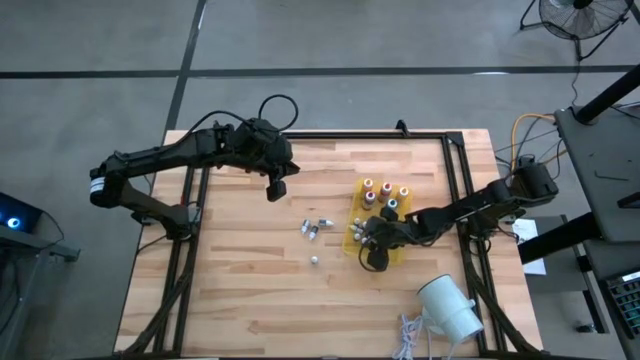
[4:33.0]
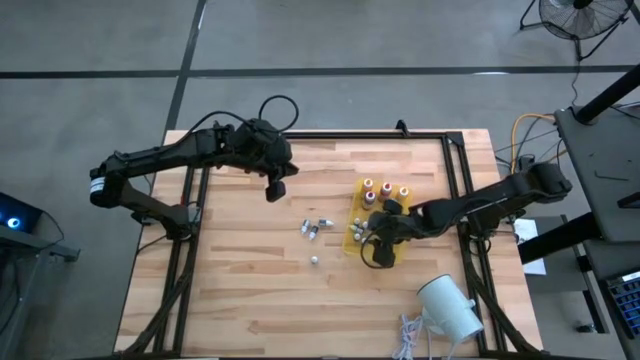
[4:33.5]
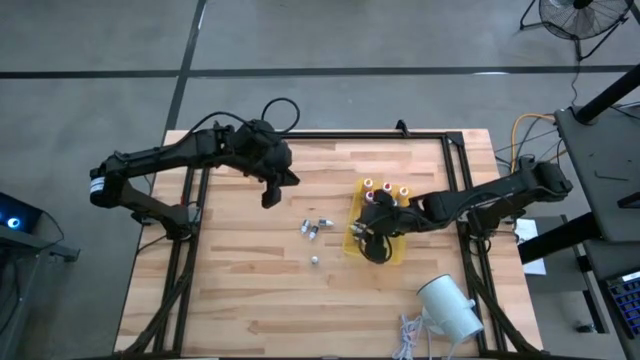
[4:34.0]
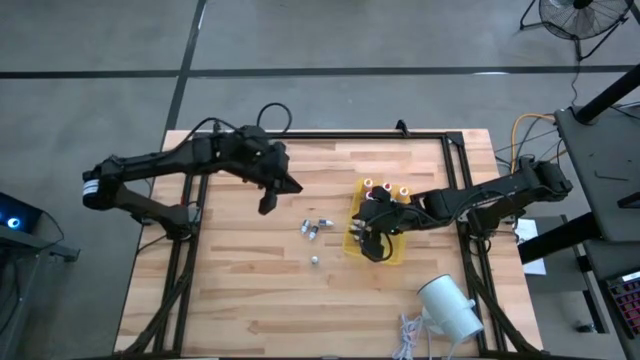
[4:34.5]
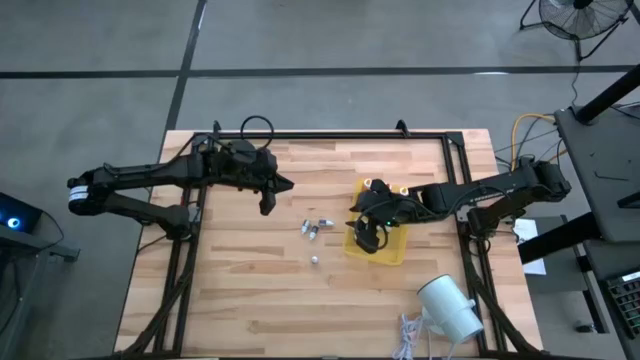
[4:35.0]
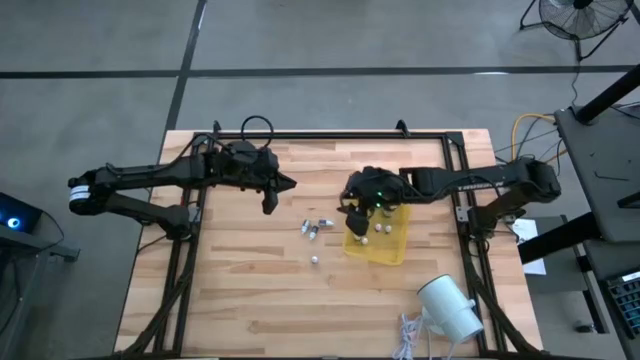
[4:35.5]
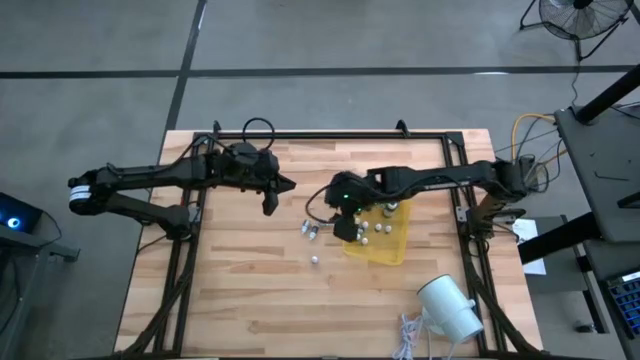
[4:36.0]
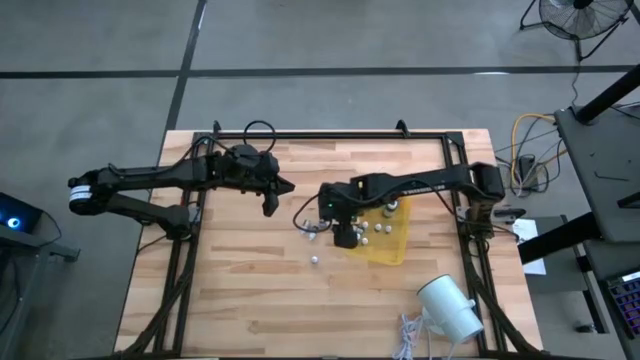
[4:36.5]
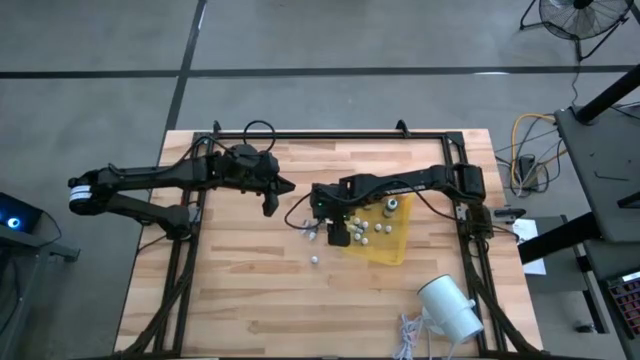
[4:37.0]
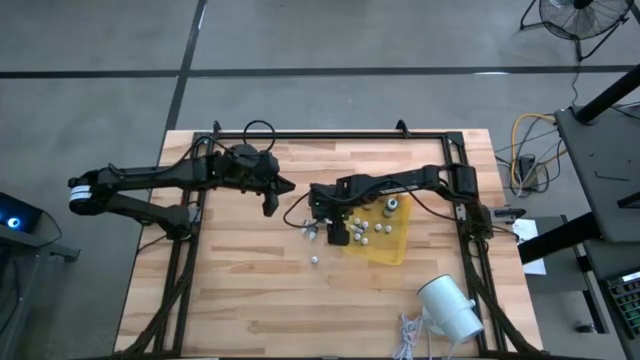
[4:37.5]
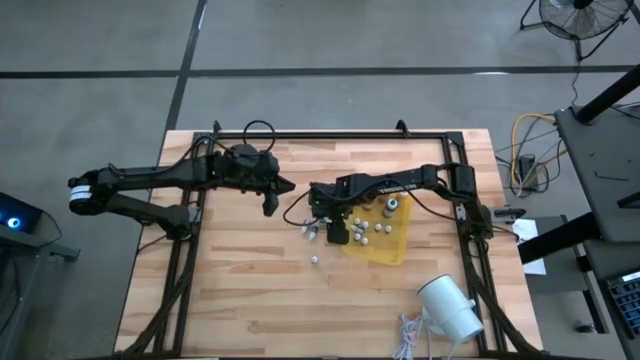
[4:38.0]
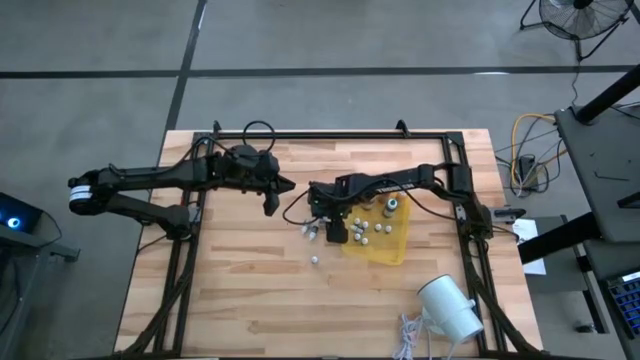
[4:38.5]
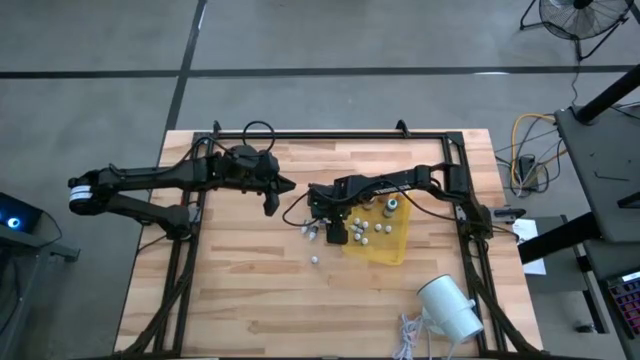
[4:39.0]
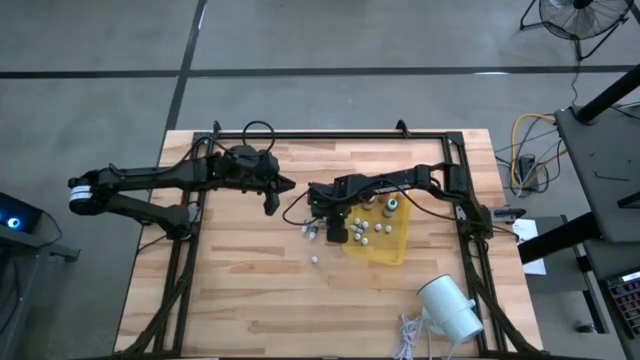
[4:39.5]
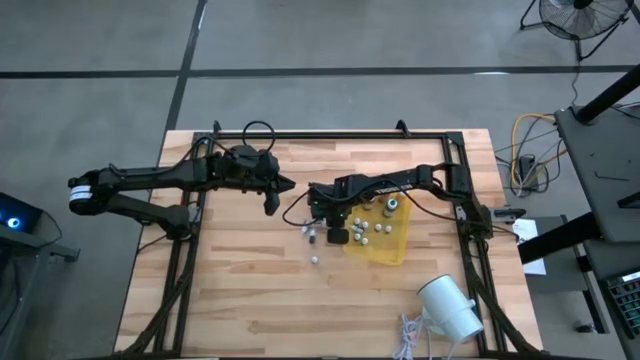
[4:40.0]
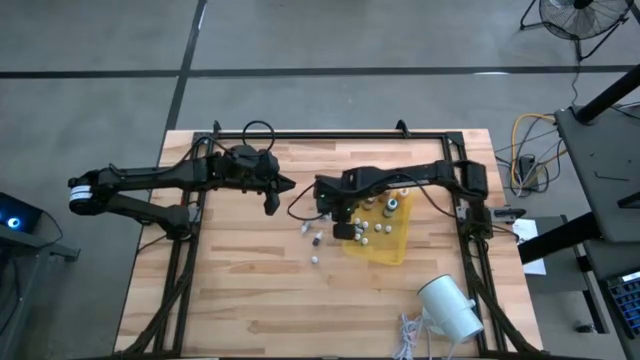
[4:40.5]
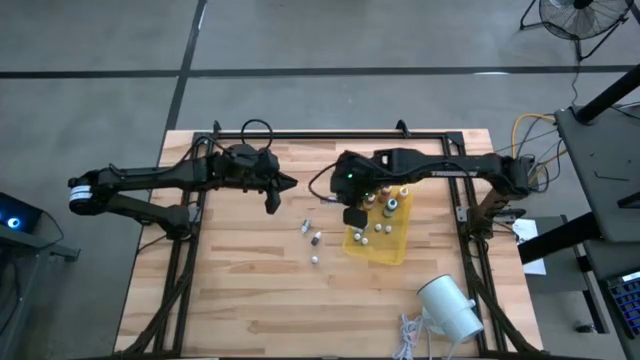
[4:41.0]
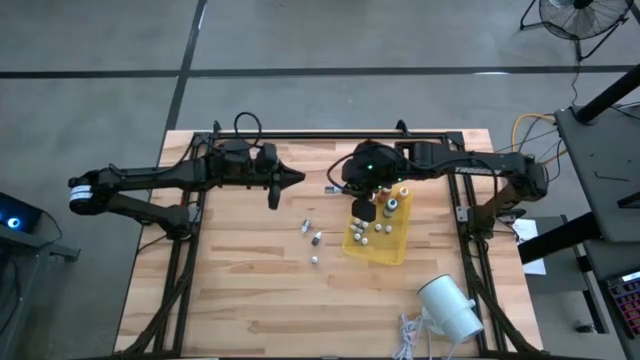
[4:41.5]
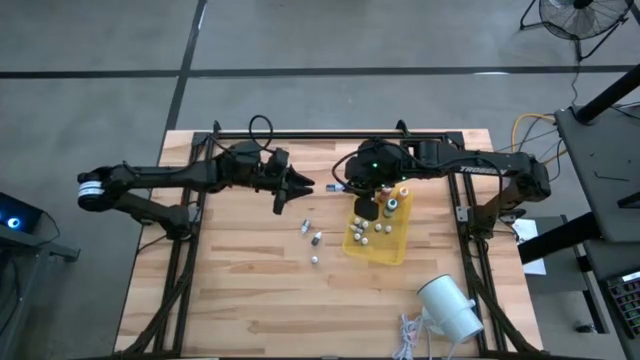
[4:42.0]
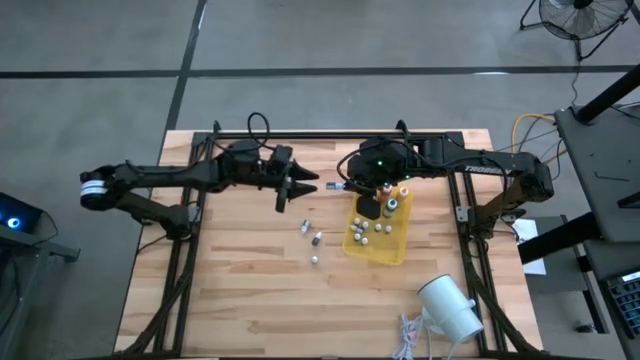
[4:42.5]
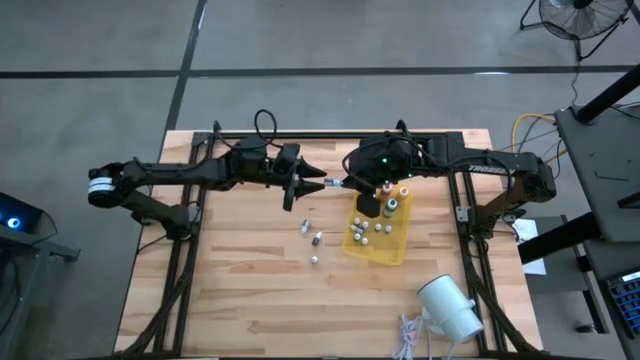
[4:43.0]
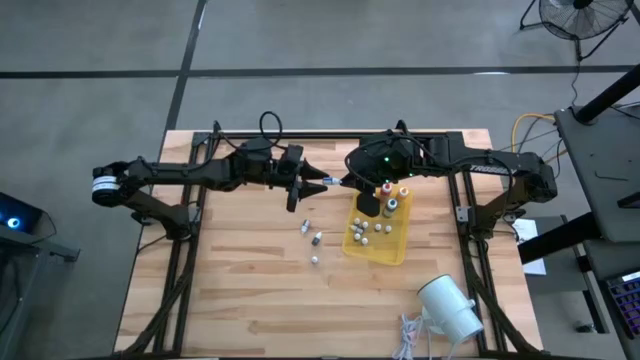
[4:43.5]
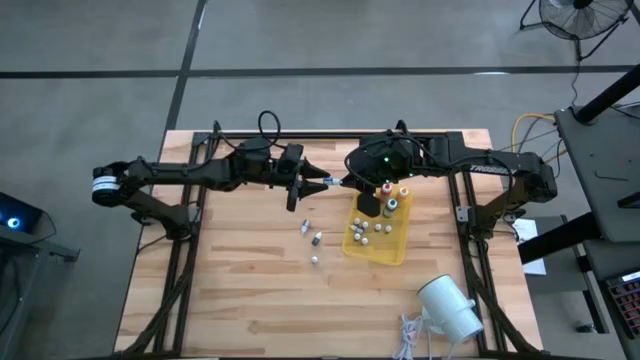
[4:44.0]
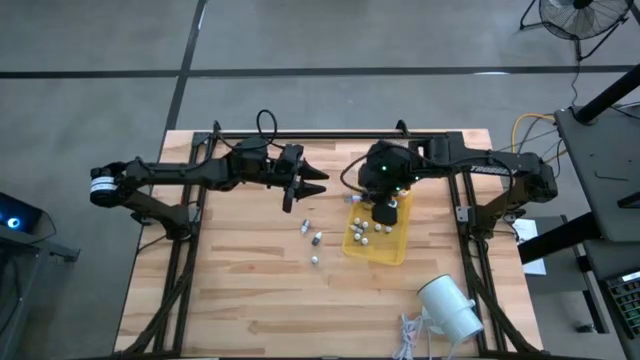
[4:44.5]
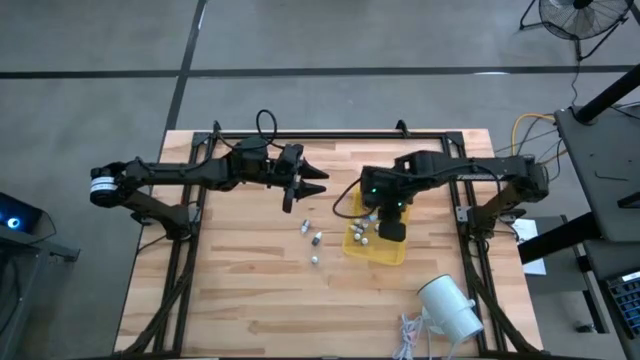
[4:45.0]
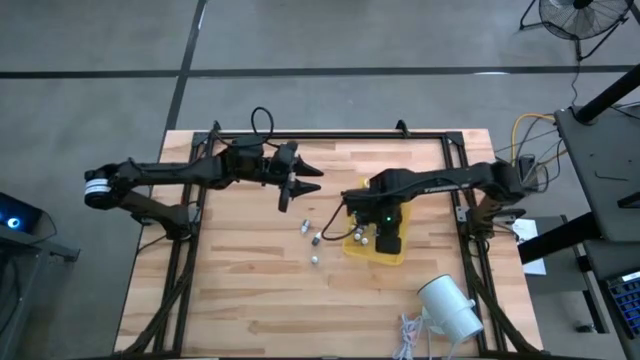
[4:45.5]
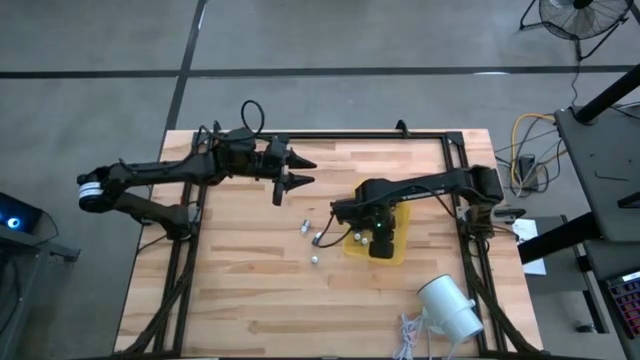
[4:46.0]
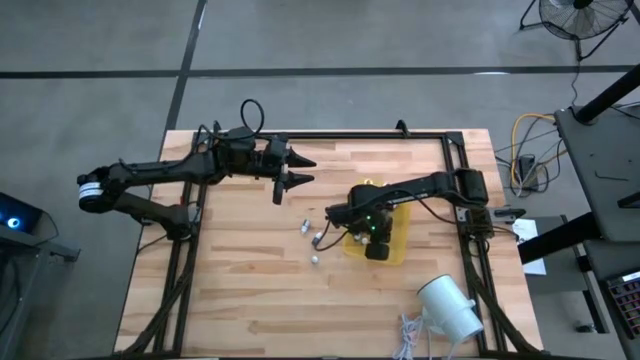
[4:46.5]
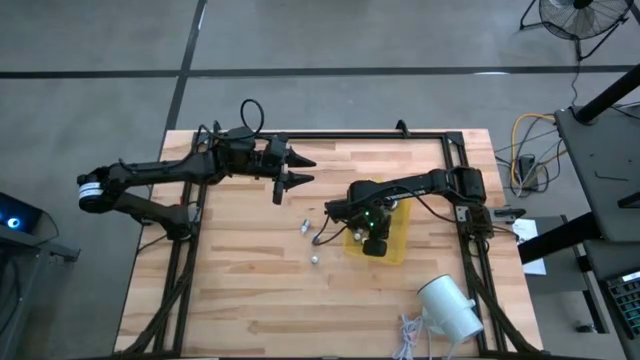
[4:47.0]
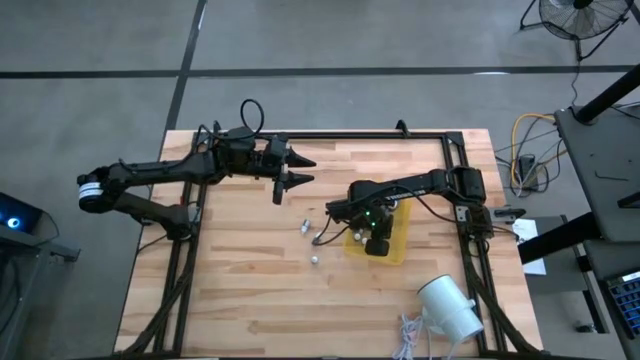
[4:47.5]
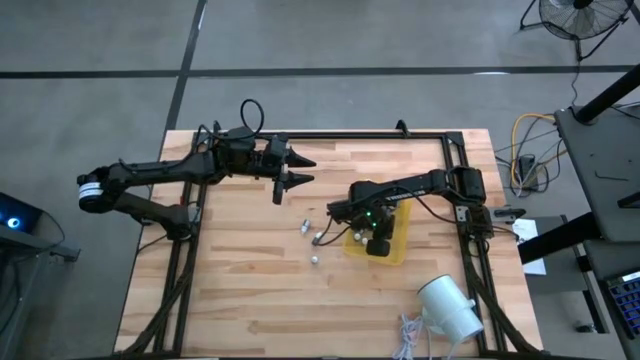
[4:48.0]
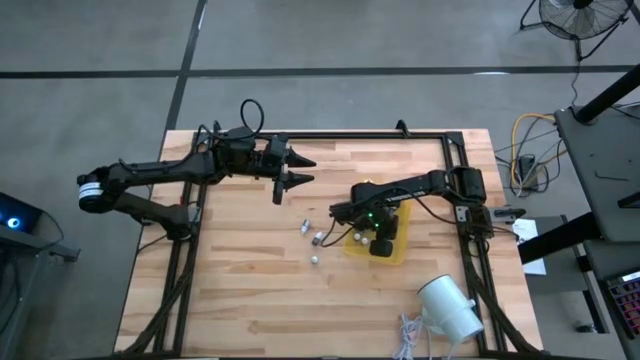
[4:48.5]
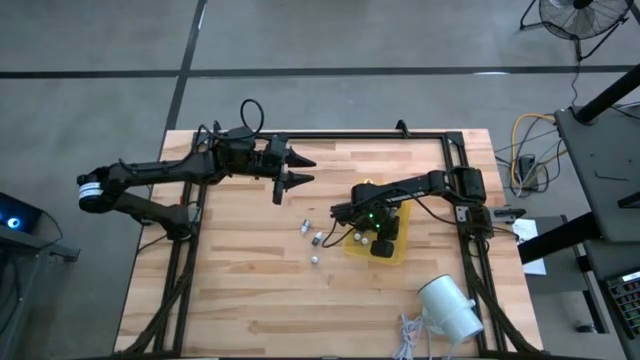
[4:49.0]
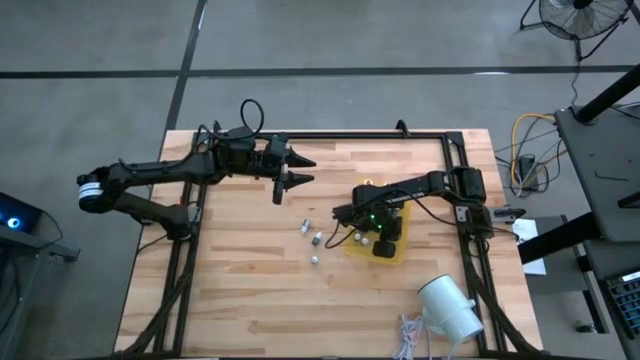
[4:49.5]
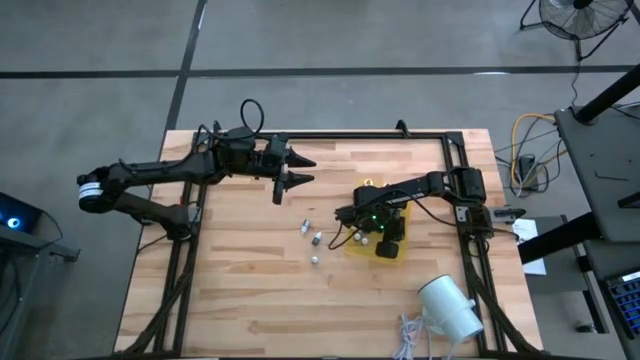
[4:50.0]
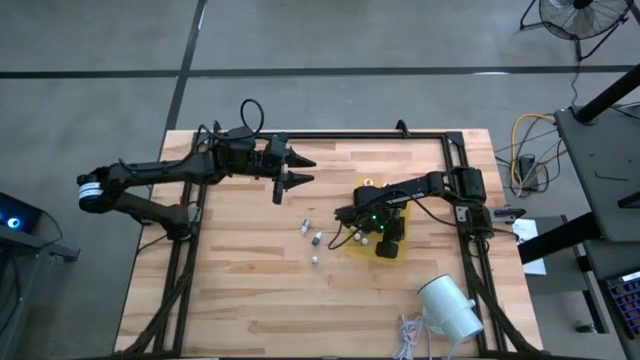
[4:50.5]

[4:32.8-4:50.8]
Task: Pick & Place food coloring
Put the top right small dark blue food coloring bottle into the yellow bin
